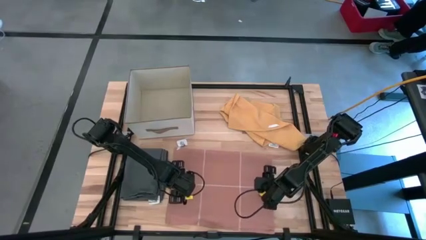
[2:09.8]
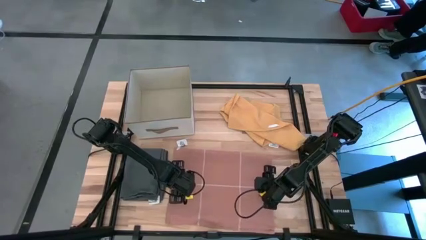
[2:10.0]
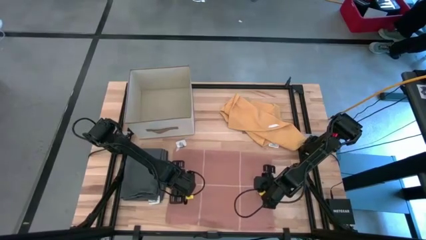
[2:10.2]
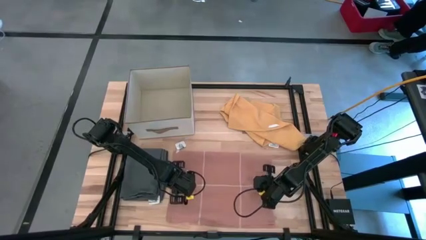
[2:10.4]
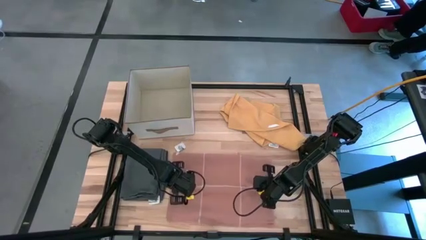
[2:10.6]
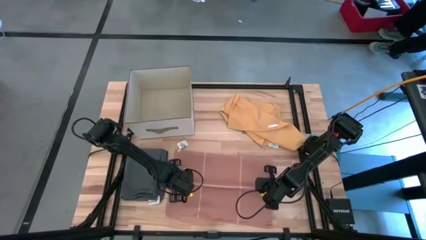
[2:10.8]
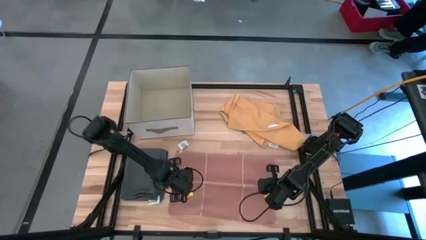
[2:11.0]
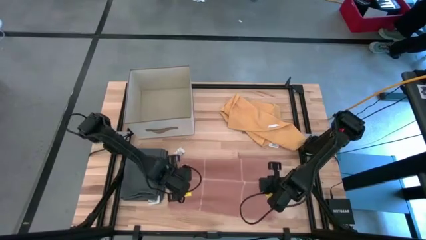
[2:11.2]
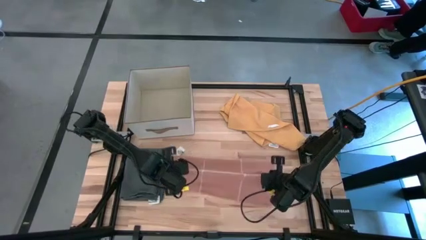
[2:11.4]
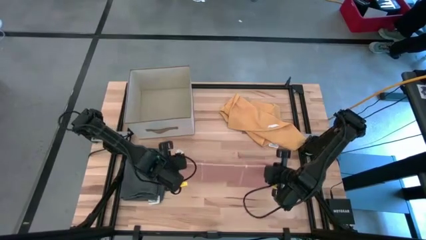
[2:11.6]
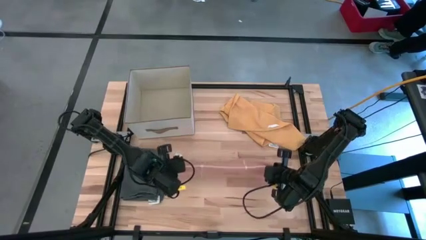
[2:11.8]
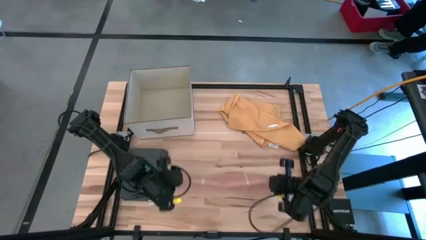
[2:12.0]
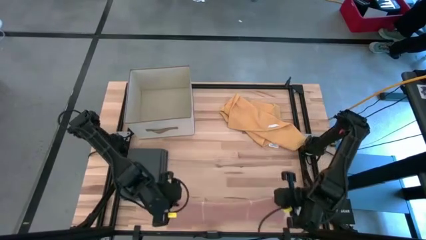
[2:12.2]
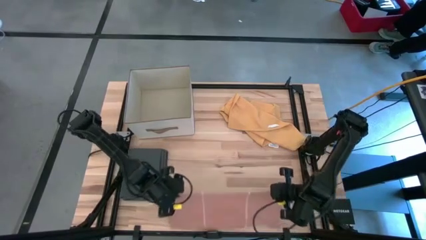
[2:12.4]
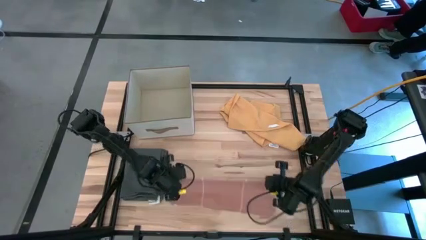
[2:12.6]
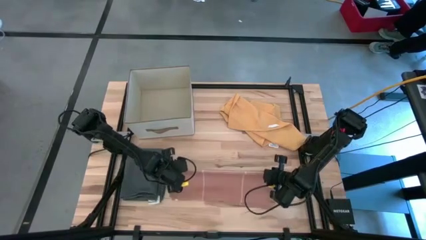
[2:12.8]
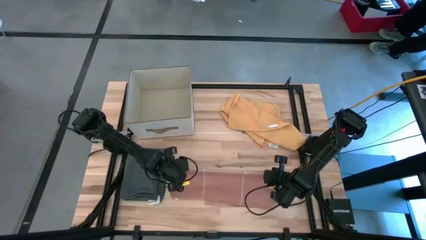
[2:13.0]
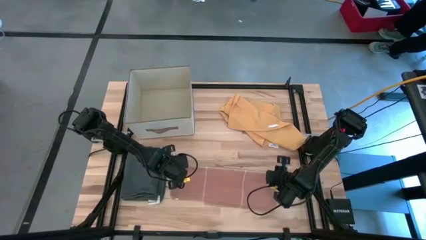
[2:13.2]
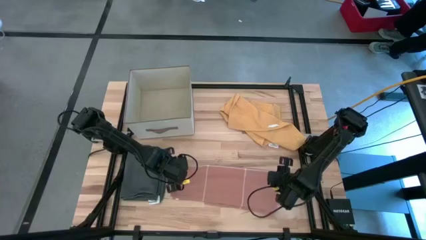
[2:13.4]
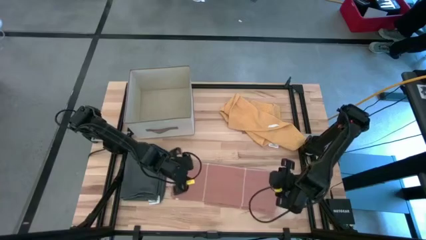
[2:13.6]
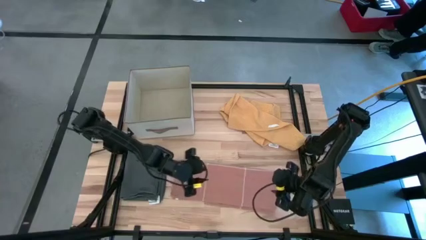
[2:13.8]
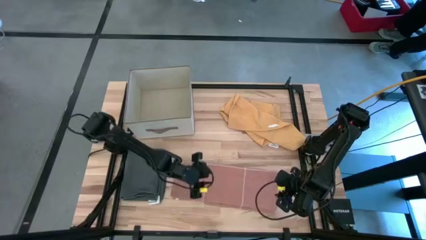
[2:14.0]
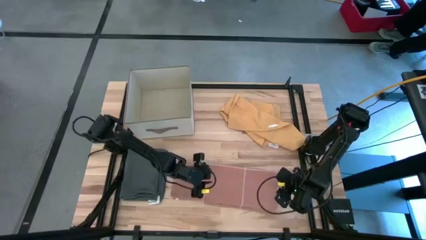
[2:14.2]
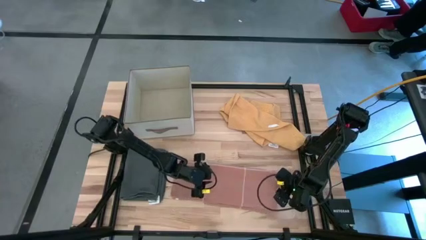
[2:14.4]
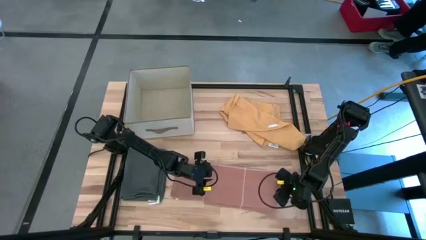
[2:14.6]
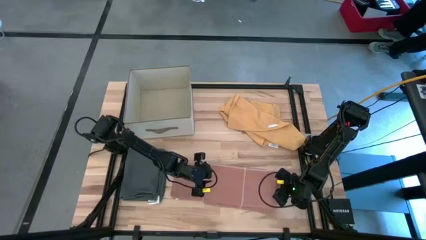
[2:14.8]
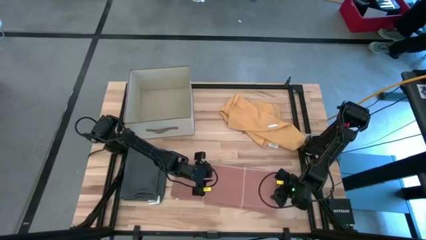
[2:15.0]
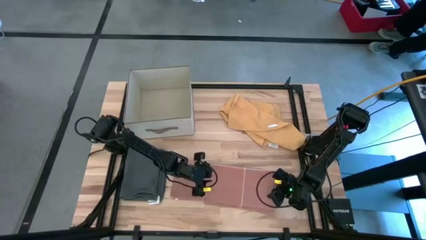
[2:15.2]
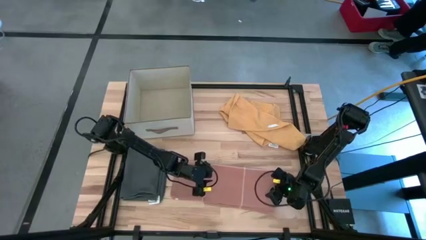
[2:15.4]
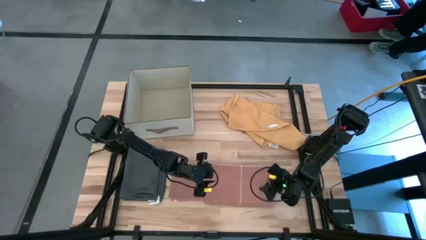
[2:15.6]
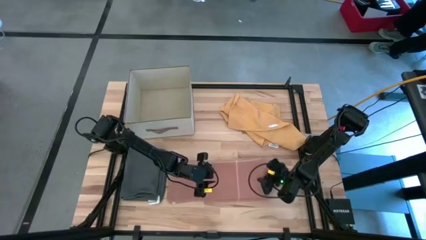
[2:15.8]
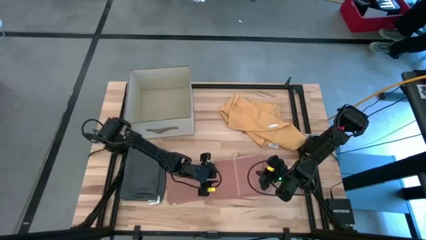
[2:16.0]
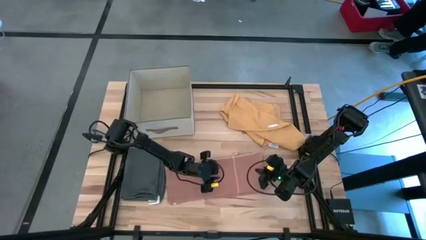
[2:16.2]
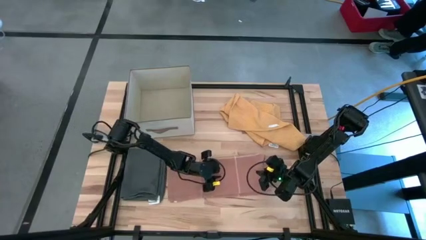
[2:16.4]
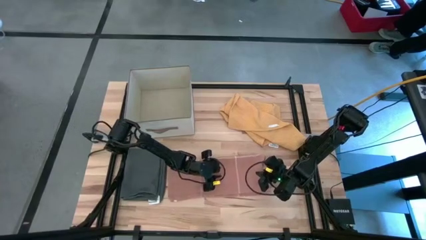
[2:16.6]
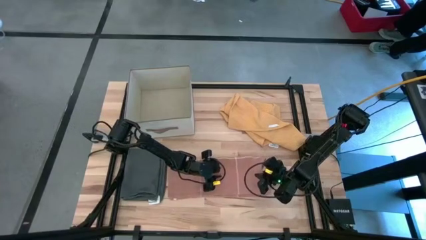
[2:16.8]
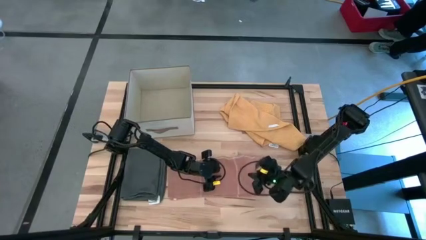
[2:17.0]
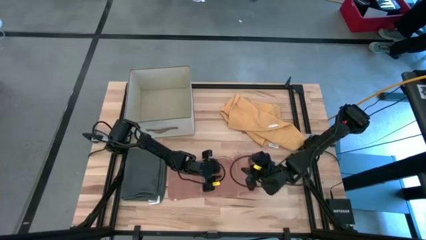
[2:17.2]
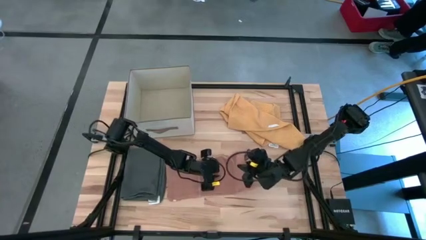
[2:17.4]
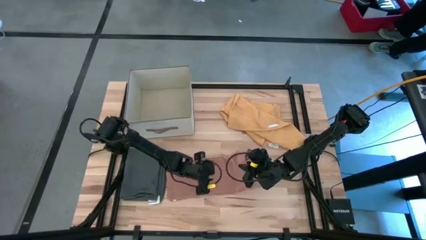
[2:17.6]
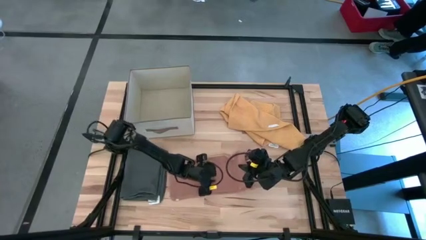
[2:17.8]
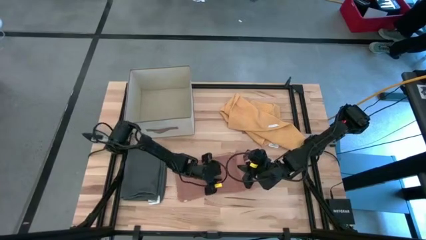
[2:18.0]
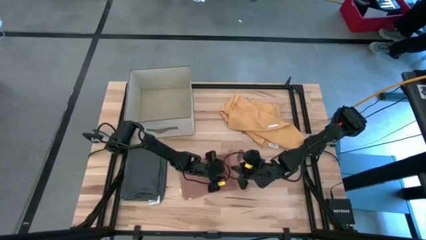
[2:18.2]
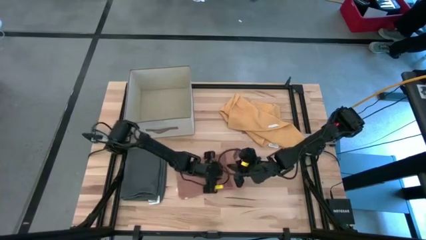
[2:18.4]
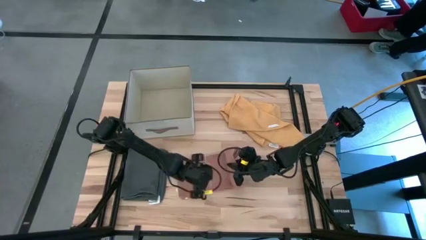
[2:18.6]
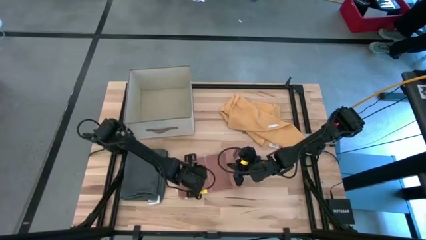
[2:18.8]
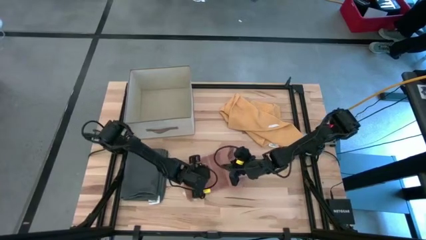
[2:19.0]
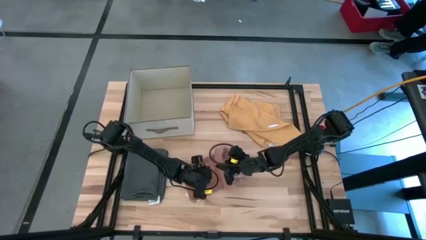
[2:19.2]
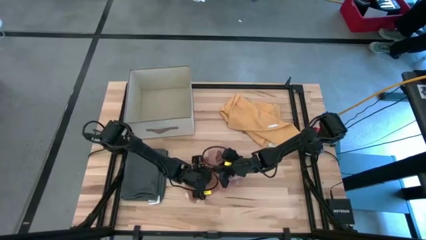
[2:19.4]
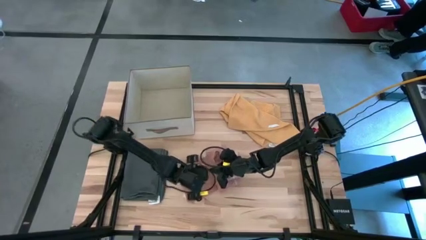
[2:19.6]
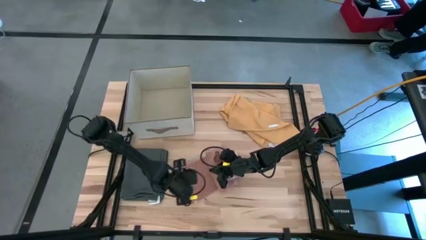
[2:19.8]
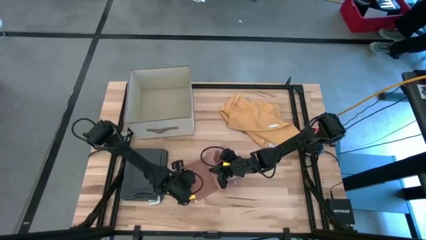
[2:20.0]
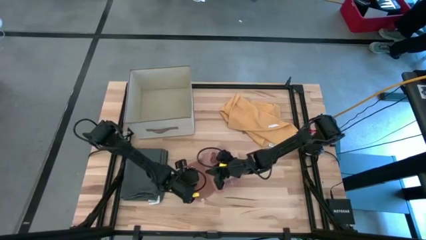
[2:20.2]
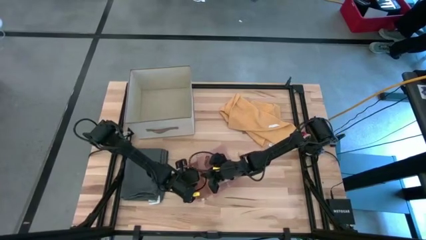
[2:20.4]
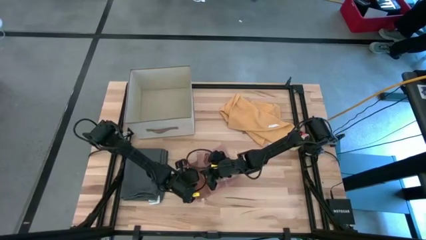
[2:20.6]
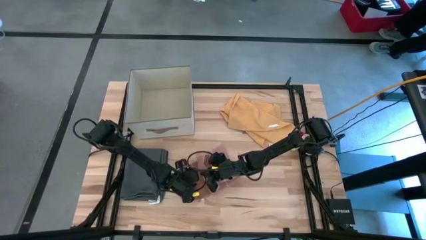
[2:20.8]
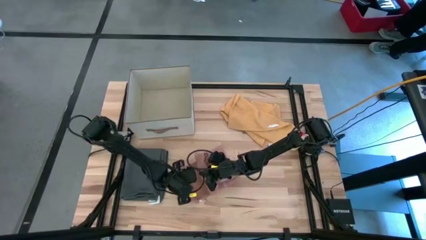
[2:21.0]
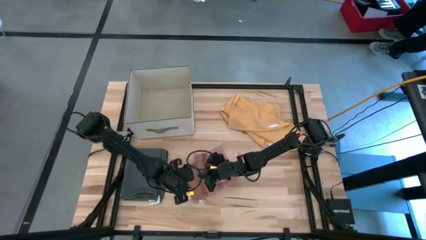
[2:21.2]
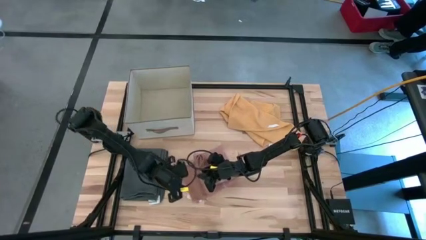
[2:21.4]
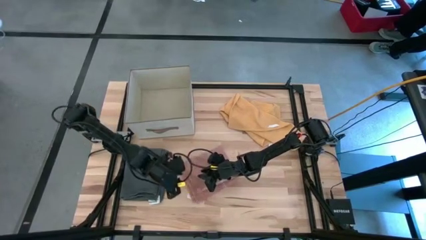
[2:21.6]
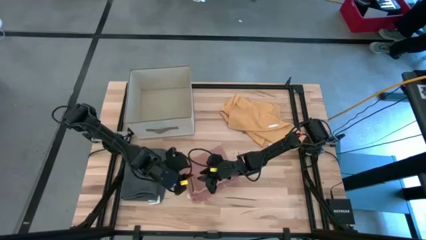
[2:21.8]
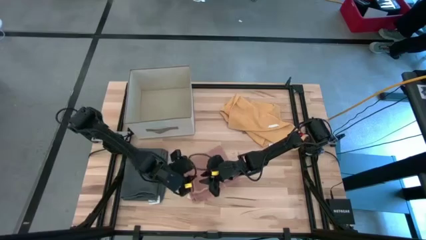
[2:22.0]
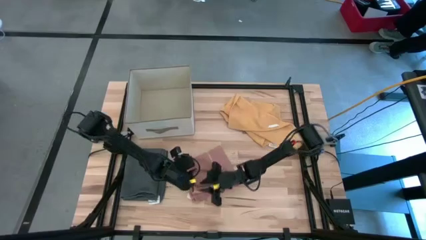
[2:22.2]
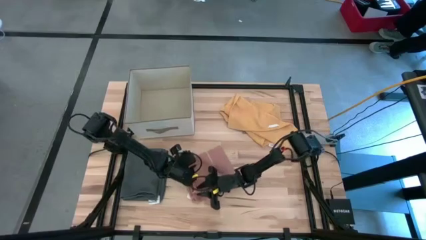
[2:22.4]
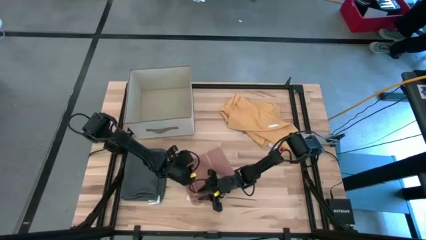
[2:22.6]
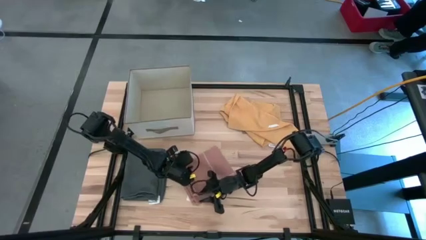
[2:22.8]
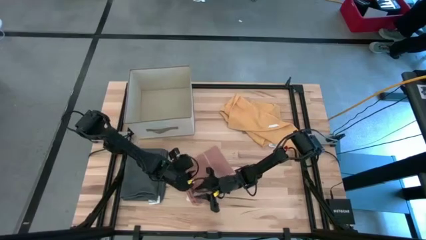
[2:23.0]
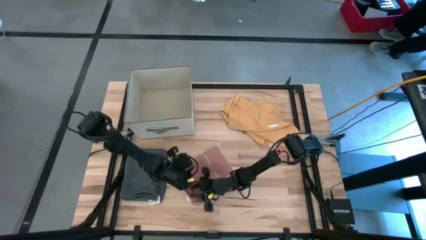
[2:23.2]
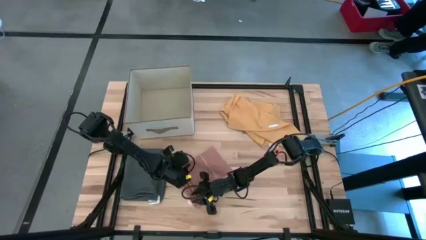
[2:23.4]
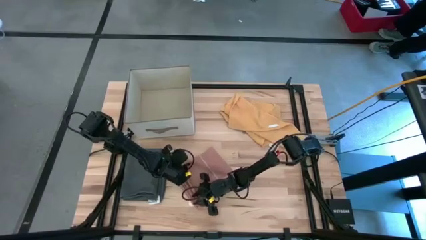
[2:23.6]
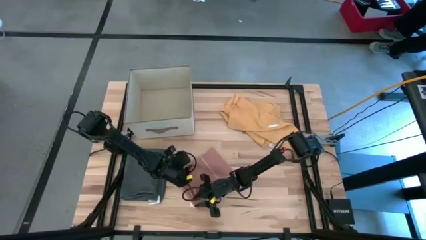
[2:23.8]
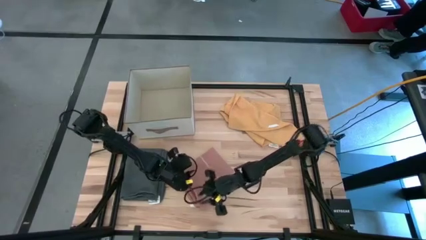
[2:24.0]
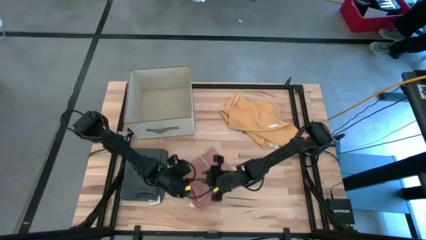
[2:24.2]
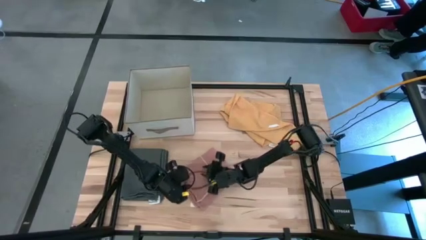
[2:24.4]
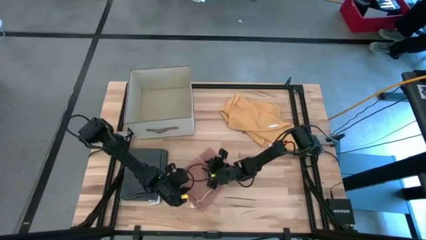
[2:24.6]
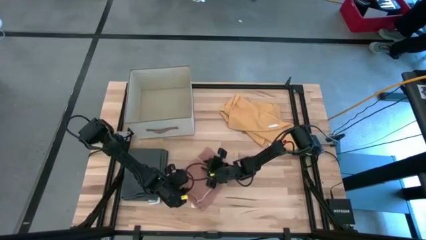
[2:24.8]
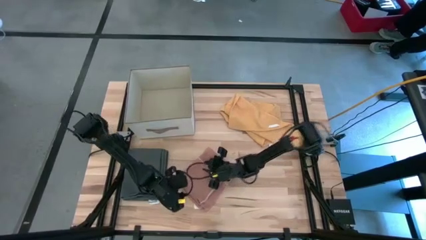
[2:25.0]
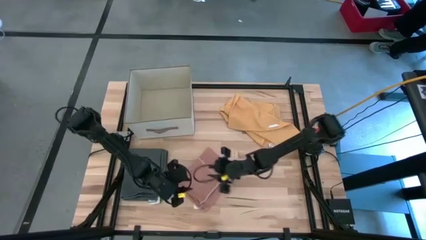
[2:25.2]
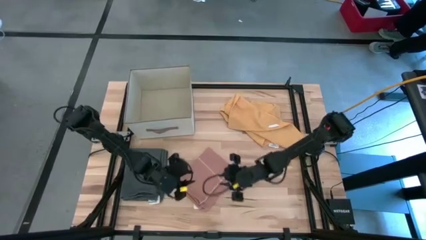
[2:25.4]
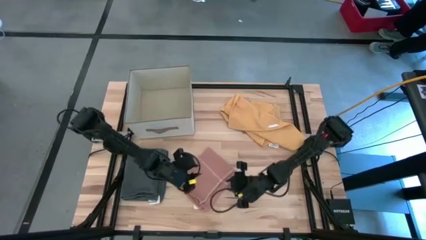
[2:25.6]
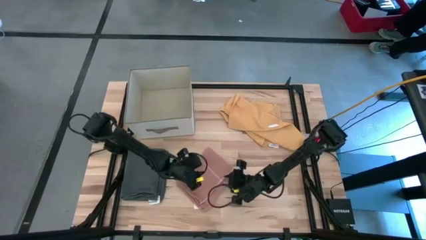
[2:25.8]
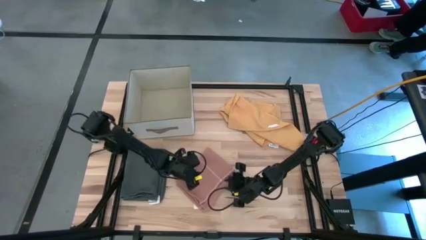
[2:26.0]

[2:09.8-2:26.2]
Task: Fold towel
Fold the light orange towel
